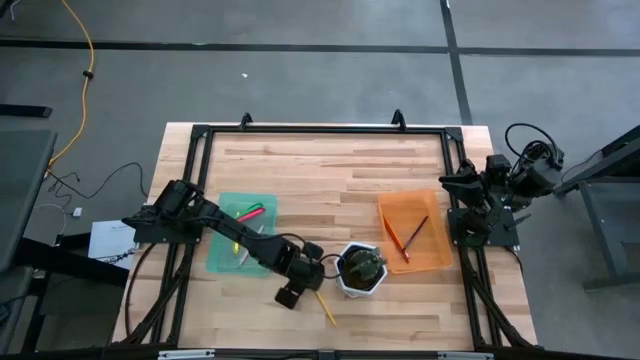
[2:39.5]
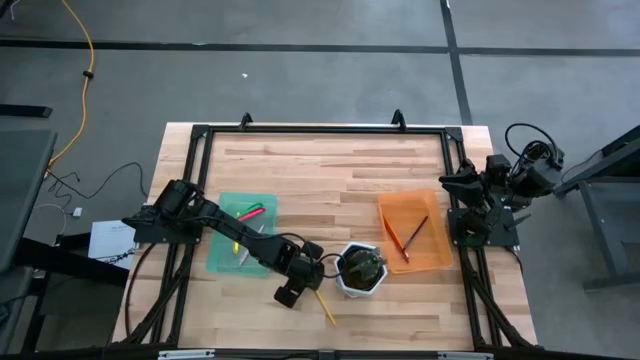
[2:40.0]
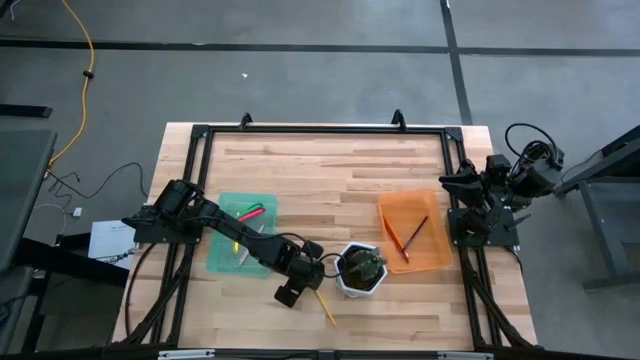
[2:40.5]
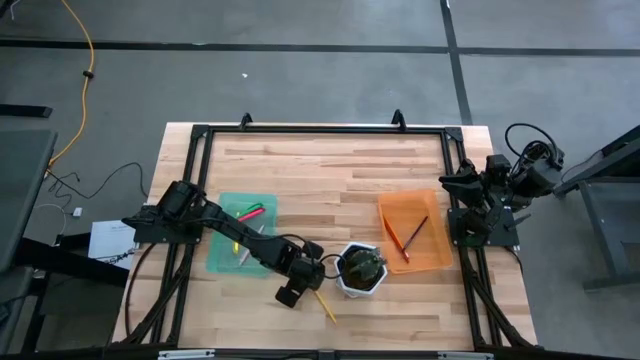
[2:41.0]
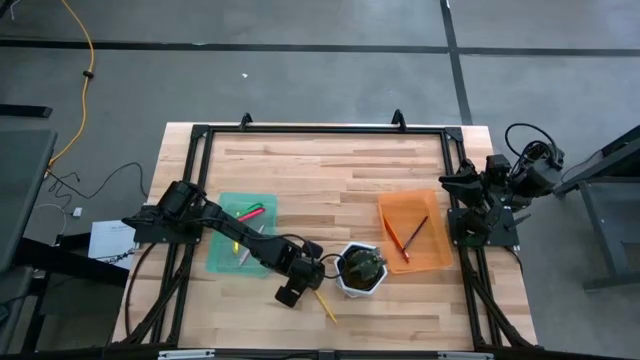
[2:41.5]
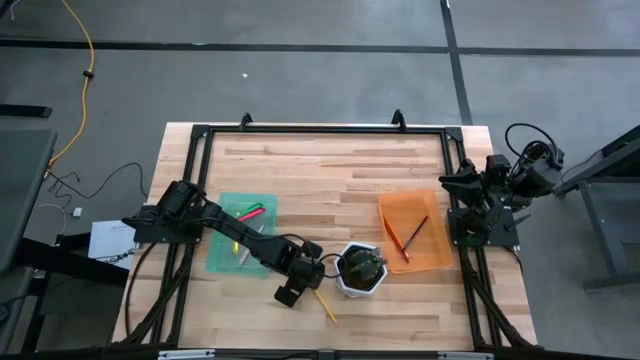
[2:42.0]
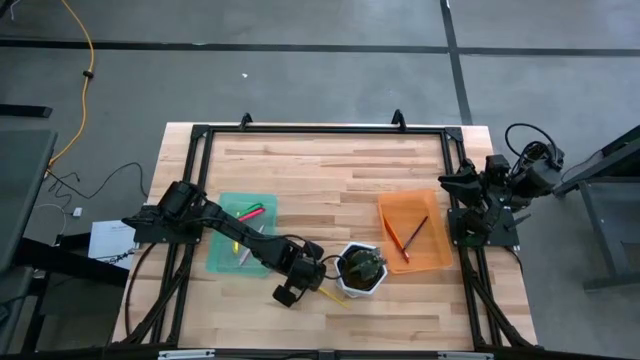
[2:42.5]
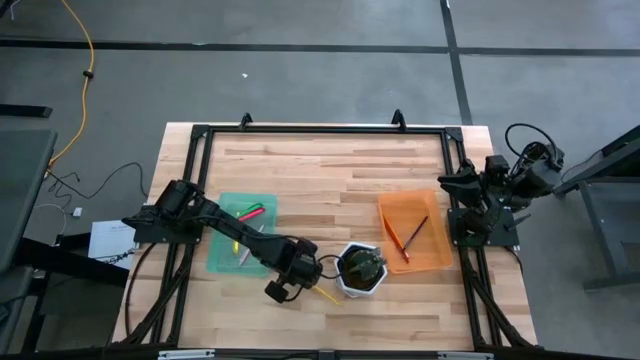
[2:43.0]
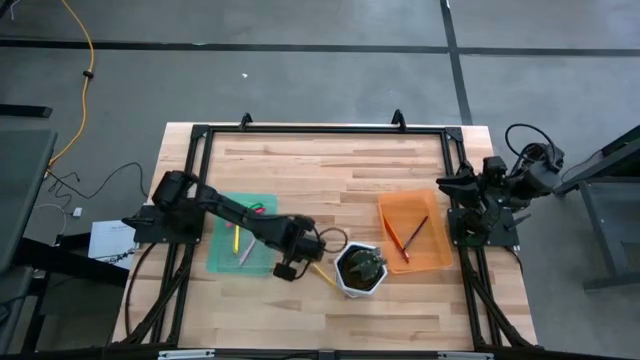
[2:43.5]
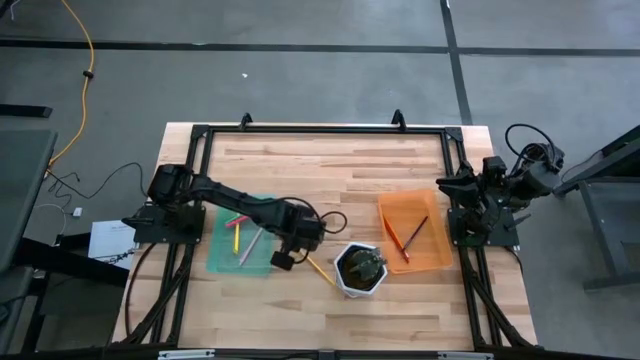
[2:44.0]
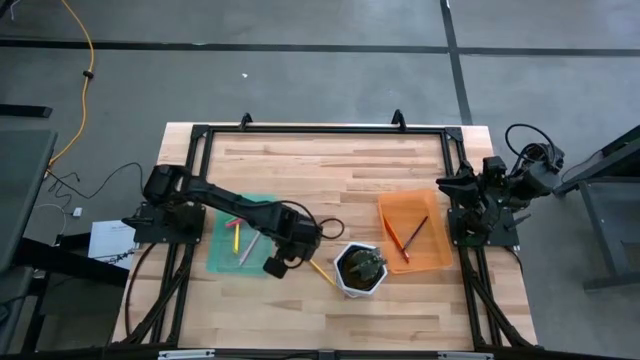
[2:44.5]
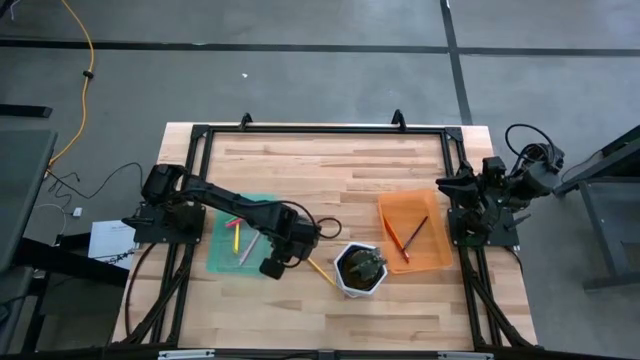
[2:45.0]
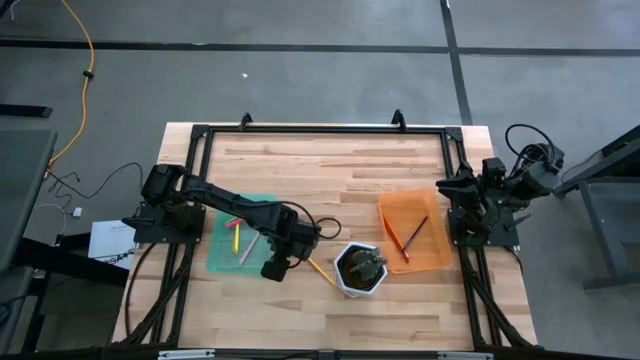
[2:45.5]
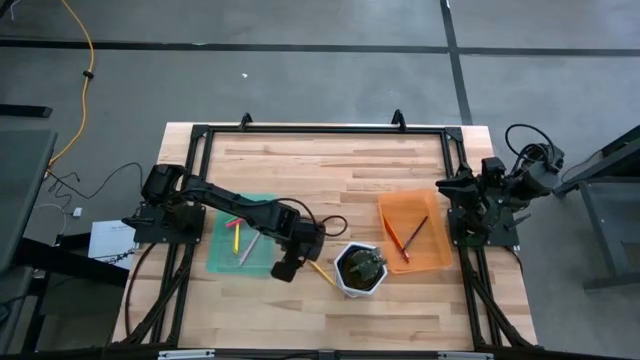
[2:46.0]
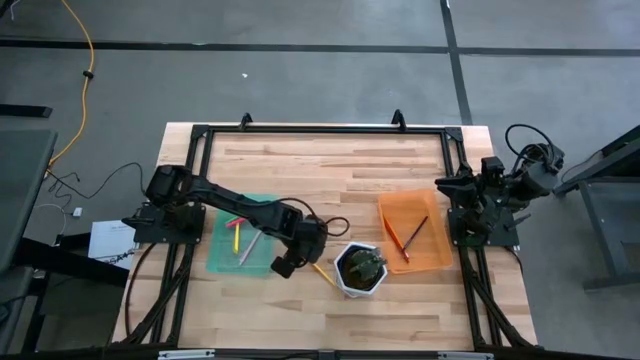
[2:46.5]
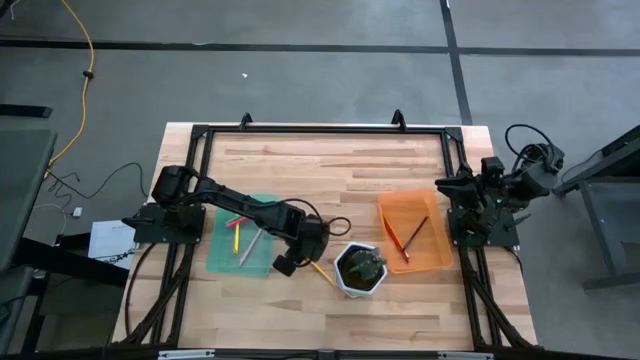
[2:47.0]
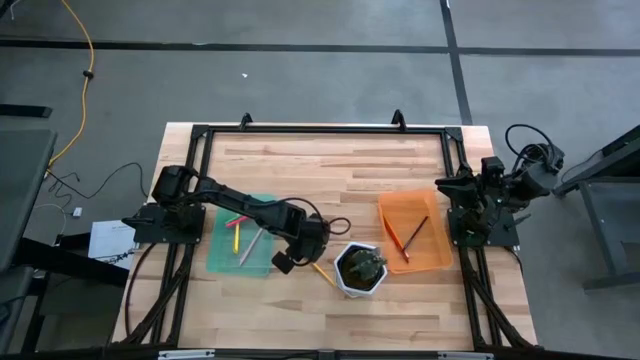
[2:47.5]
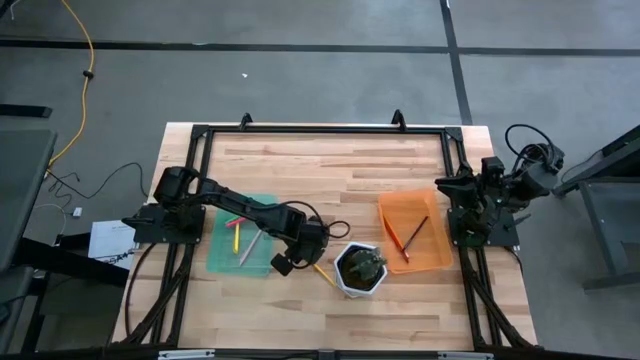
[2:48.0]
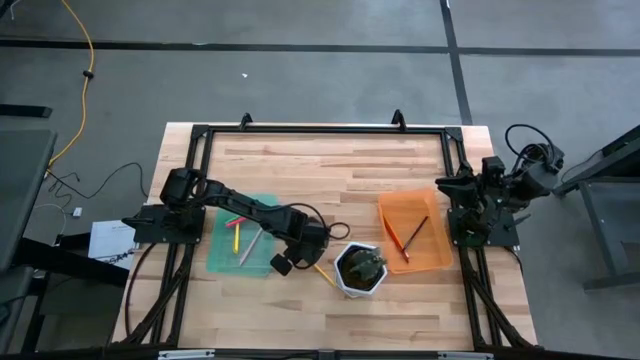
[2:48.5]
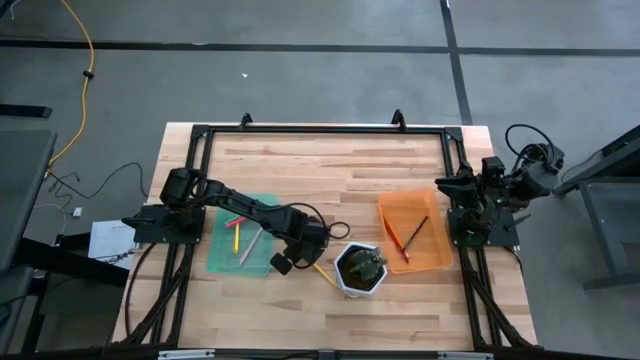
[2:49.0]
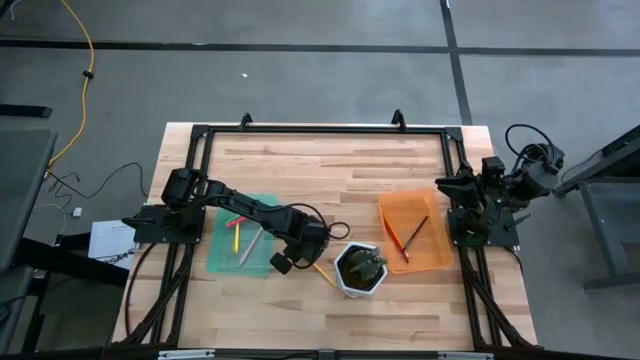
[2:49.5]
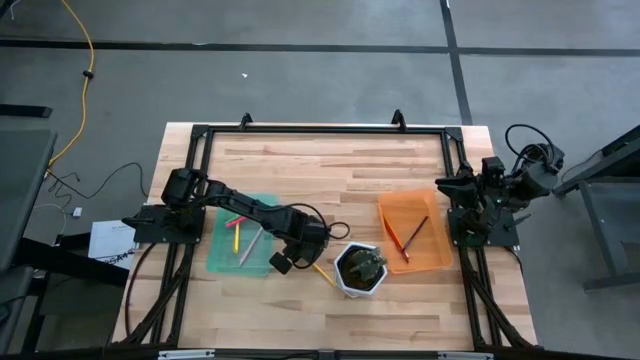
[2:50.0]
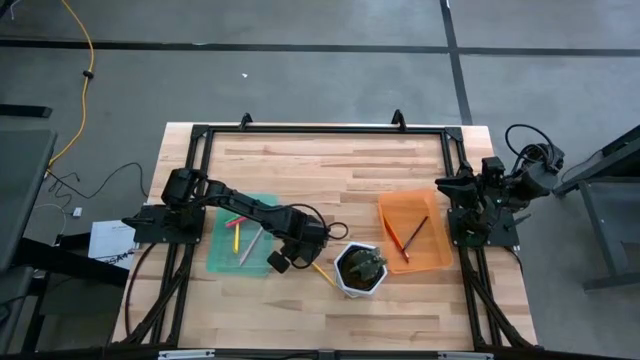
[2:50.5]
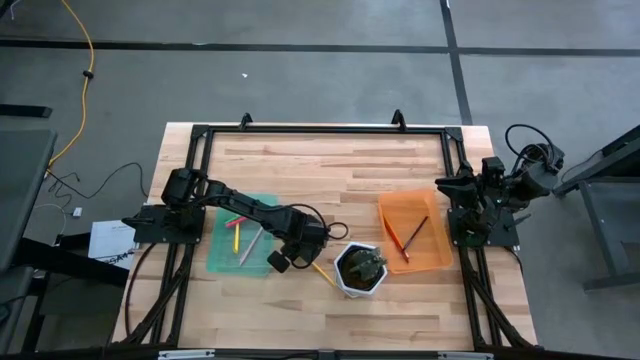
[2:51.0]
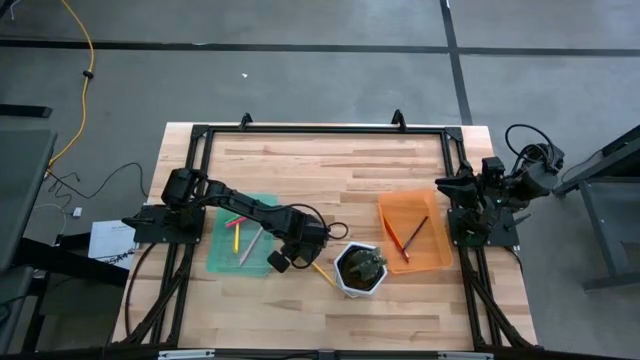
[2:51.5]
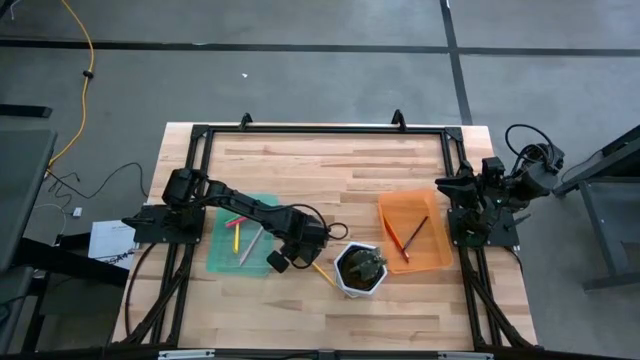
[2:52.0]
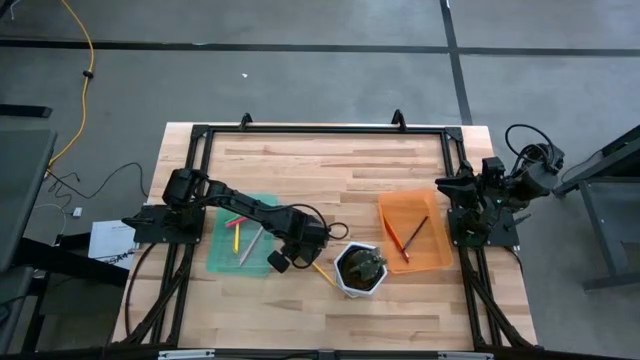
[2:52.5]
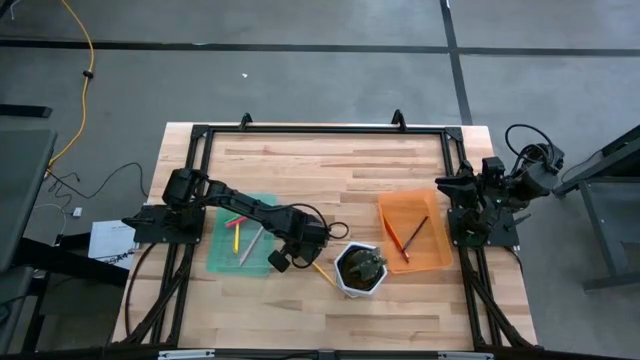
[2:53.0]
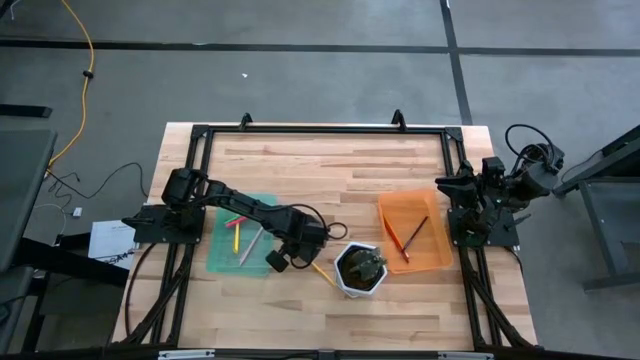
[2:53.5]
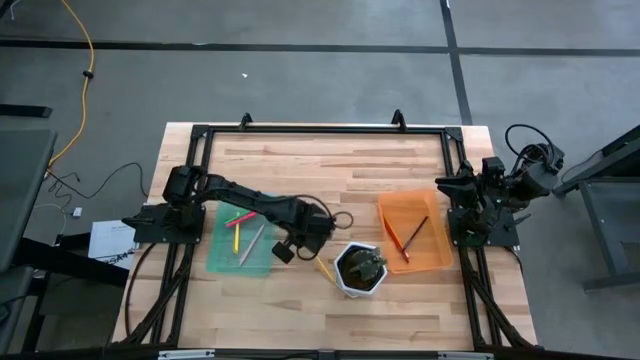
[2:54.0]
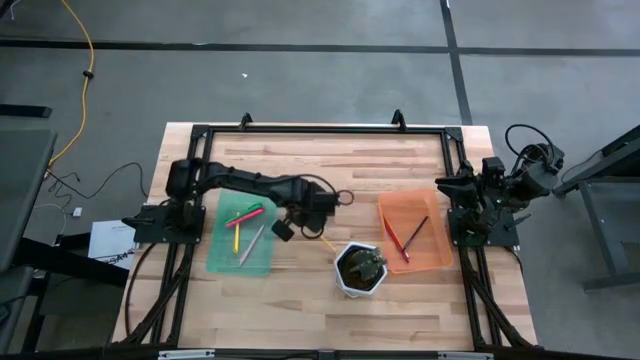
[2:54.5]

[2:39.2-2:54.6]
Task: Sort pens & pencils
Put the yellow pencil into the orange bin

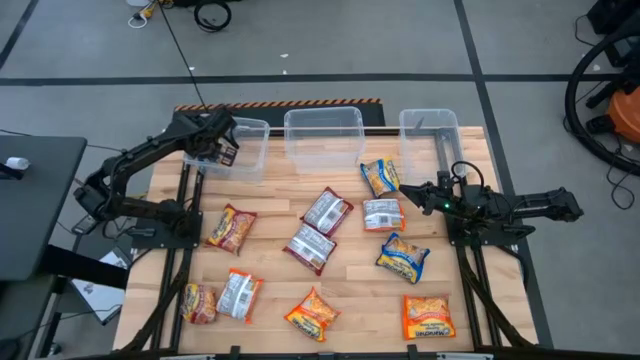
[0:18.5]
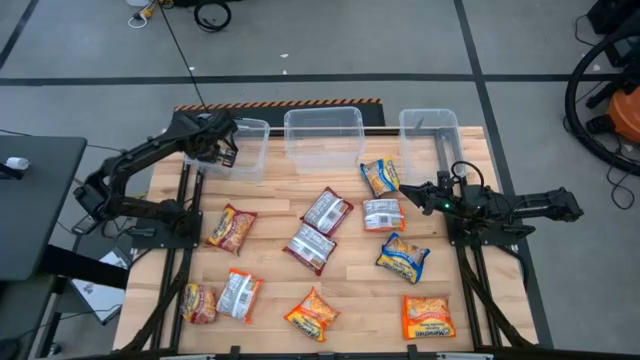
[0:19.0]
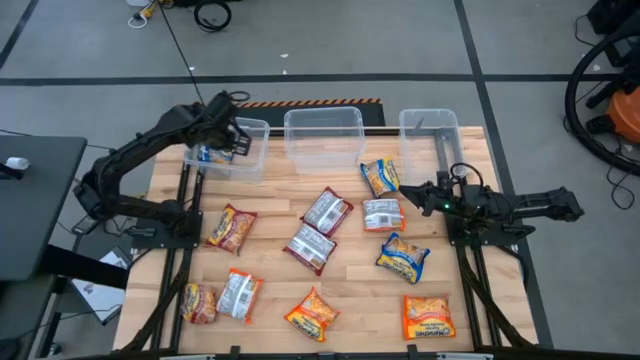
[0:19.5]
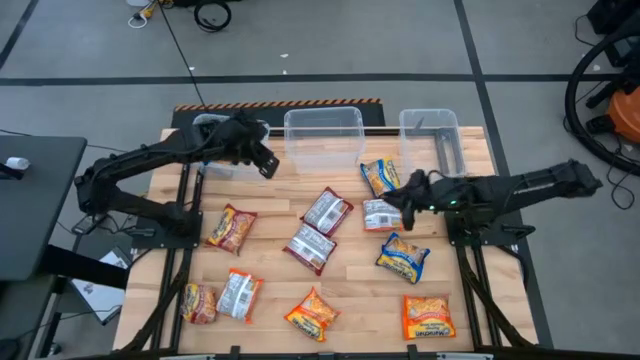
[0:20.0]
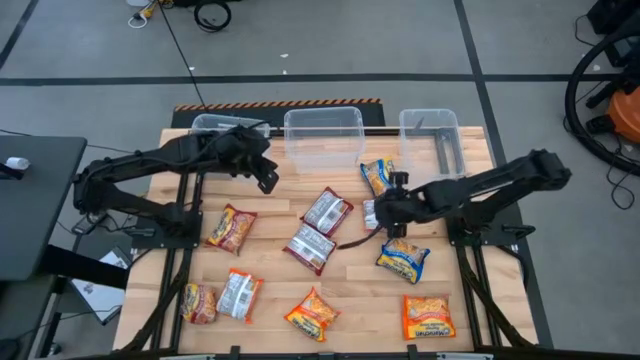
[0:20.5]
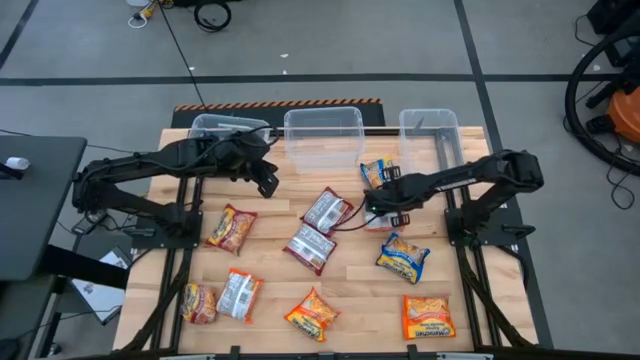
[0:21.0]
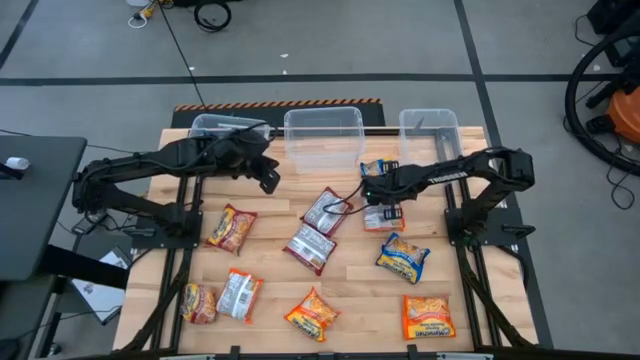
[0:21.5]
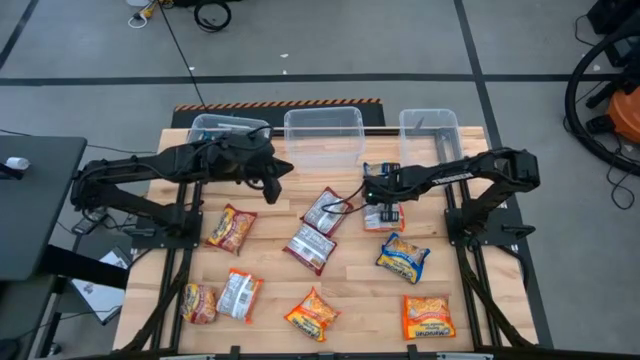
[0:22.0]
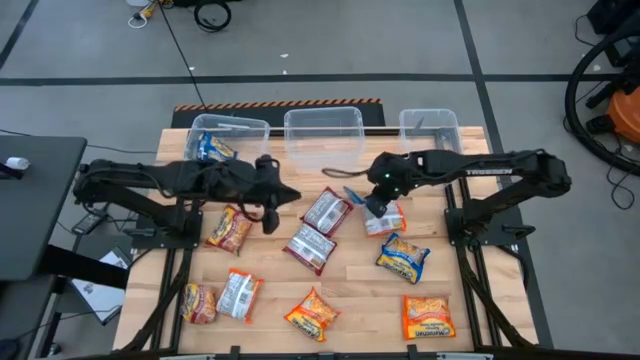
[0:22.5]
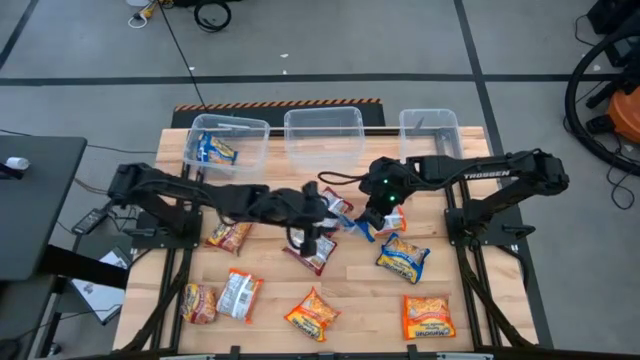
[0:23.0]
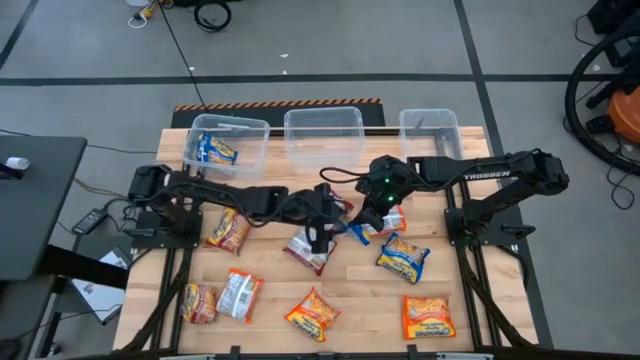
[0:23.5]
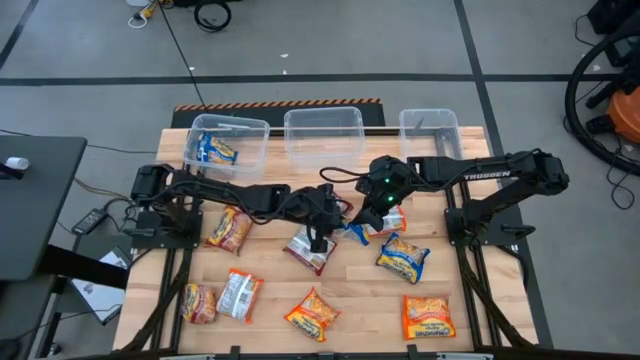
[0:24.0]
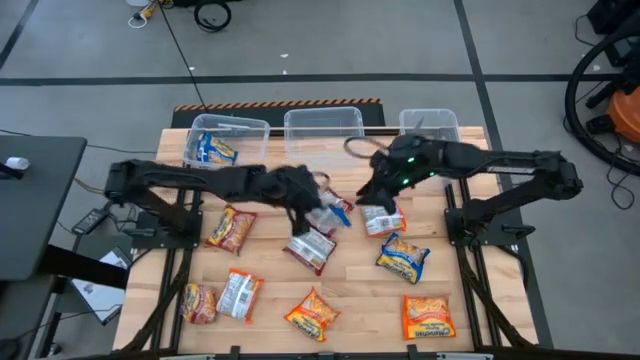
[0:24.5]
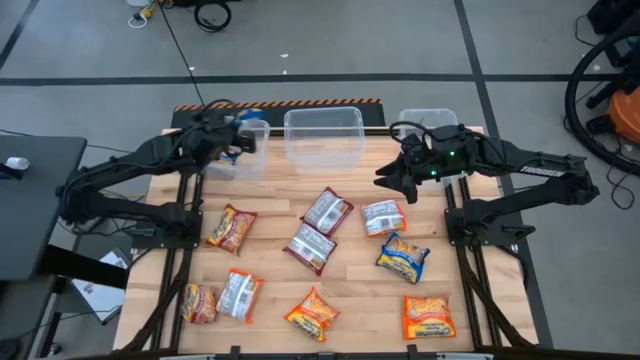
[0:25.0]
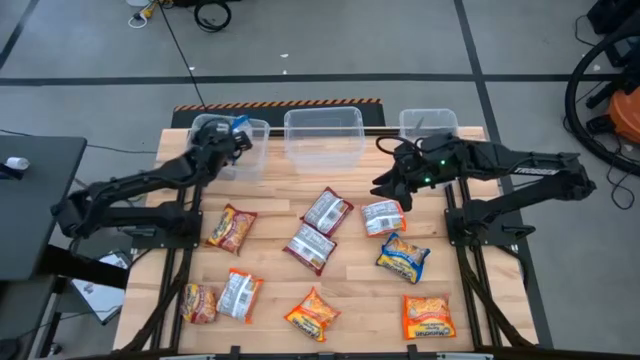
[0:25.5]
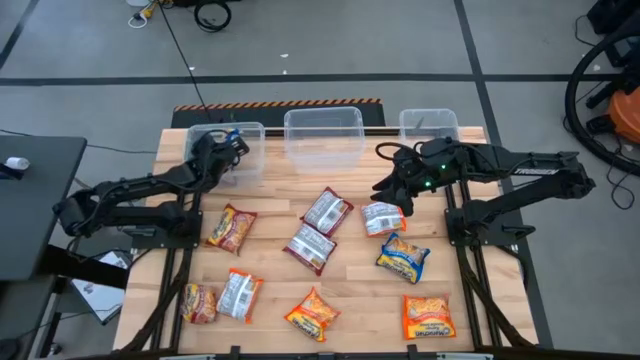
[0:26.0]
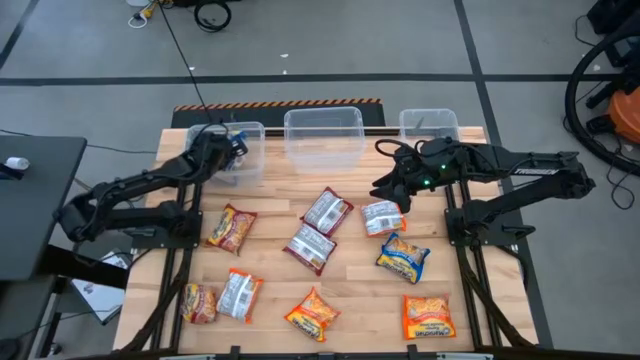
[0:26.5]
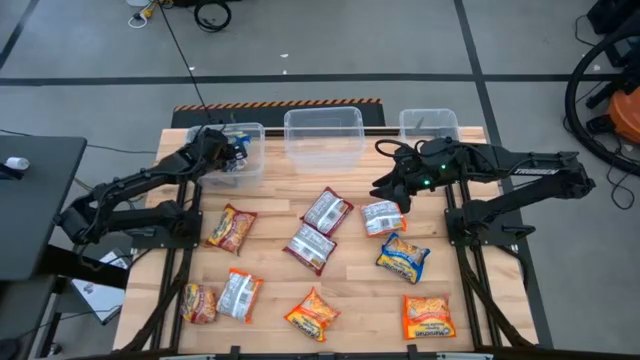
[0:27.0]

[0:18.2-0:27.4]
Task: Sort Maruchan noodles
Put the top right blue noodle pack into the left transparent bin
